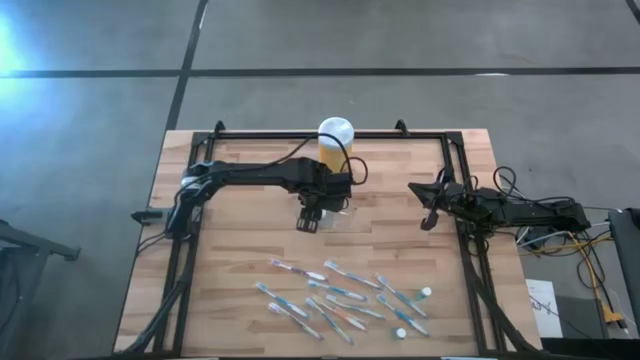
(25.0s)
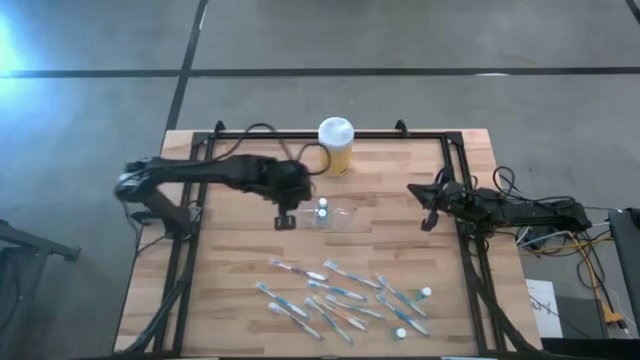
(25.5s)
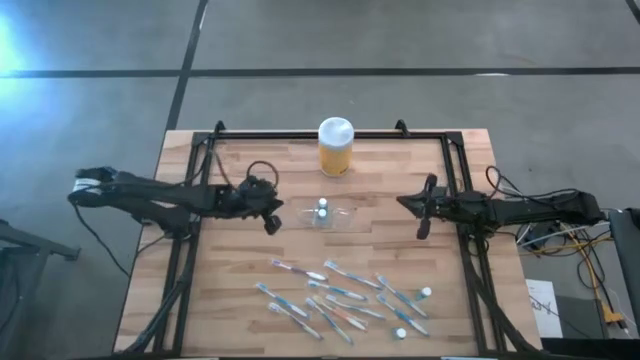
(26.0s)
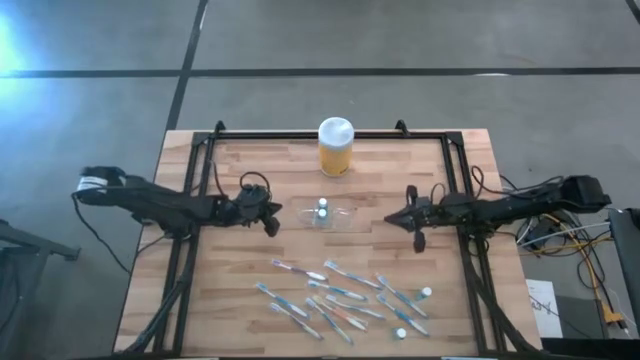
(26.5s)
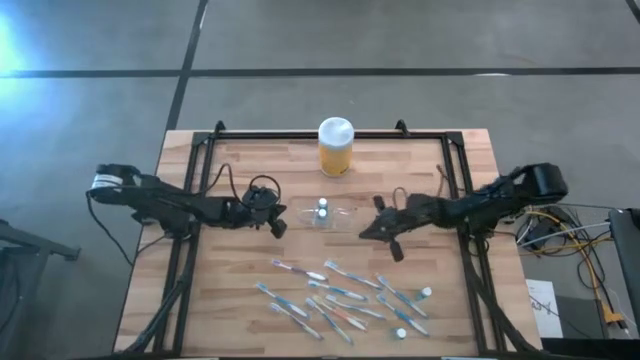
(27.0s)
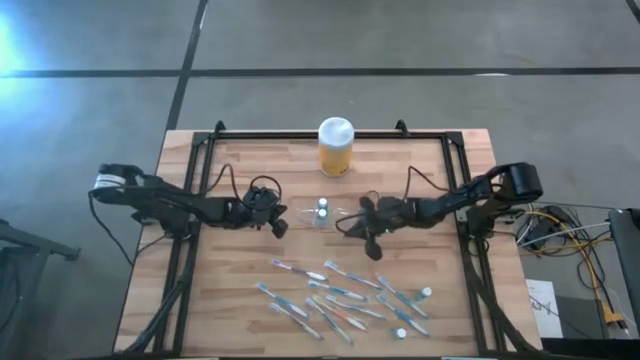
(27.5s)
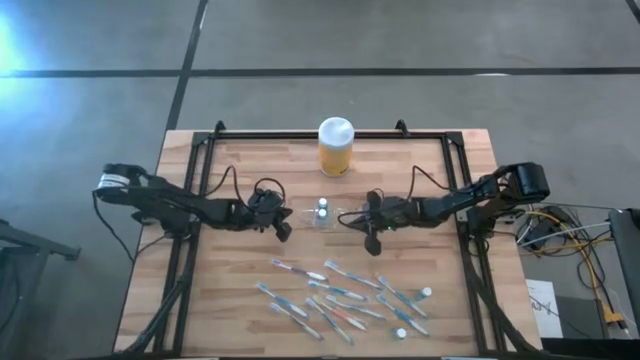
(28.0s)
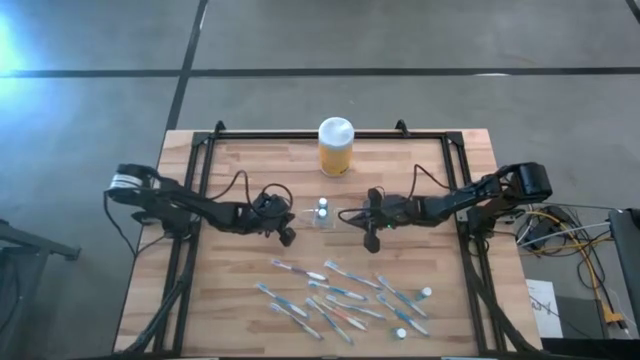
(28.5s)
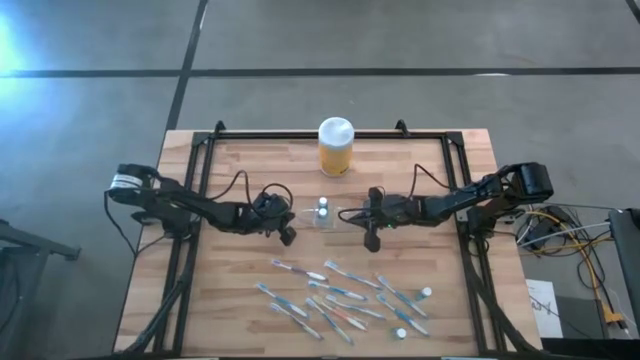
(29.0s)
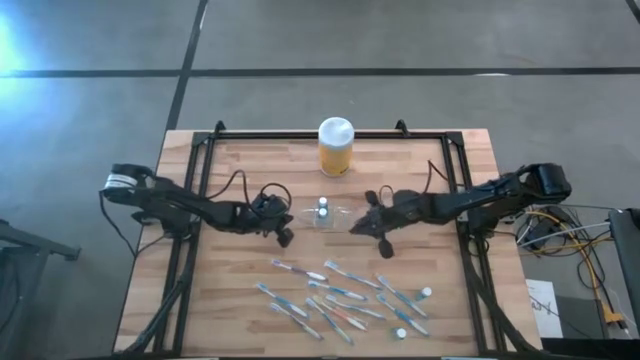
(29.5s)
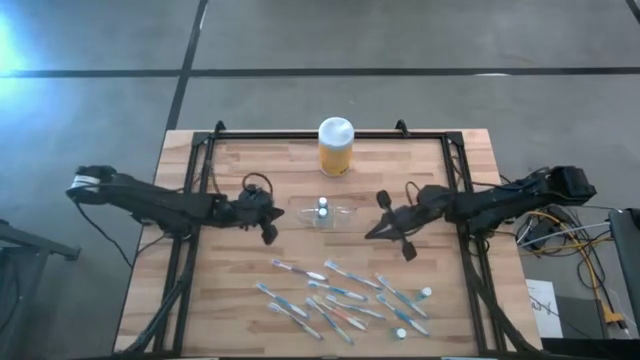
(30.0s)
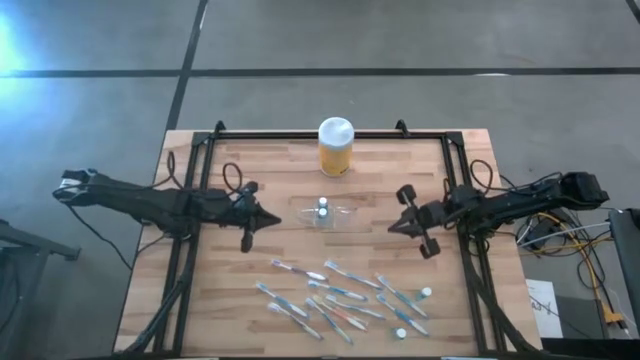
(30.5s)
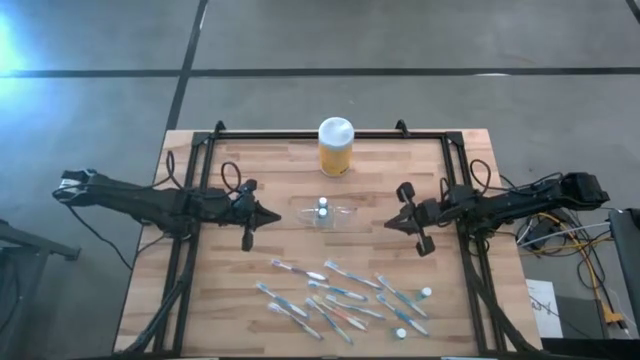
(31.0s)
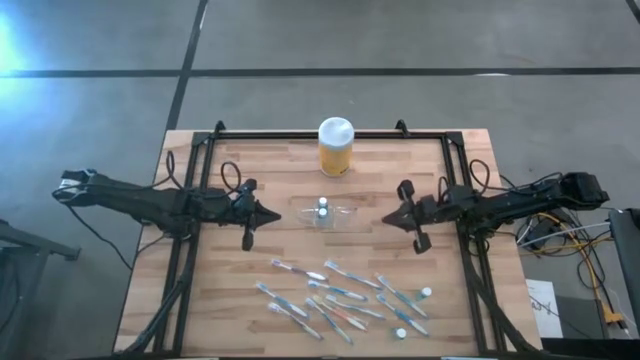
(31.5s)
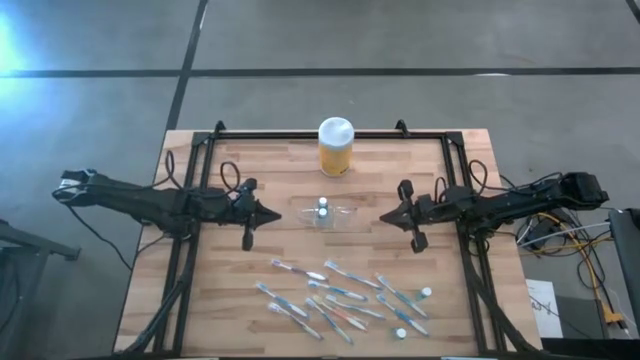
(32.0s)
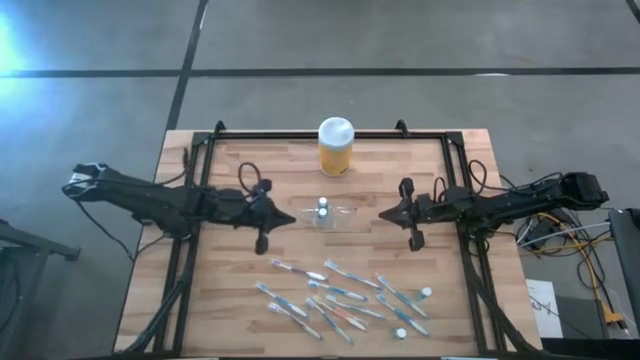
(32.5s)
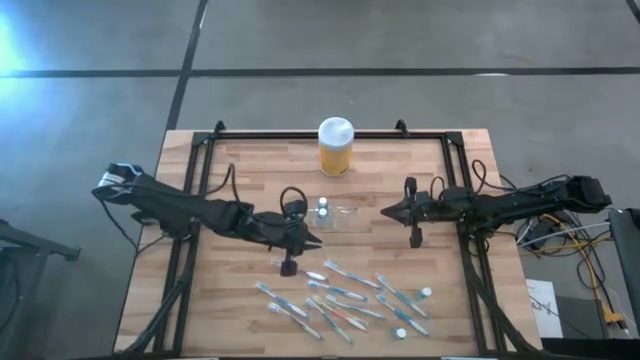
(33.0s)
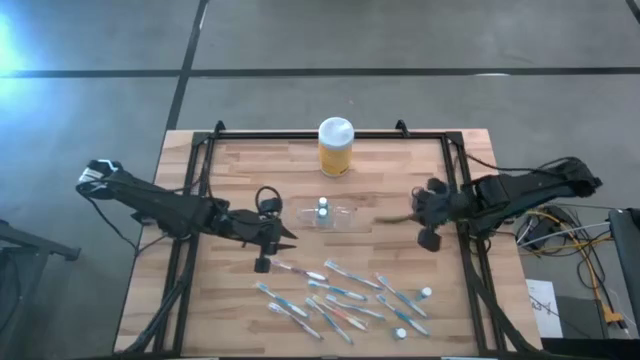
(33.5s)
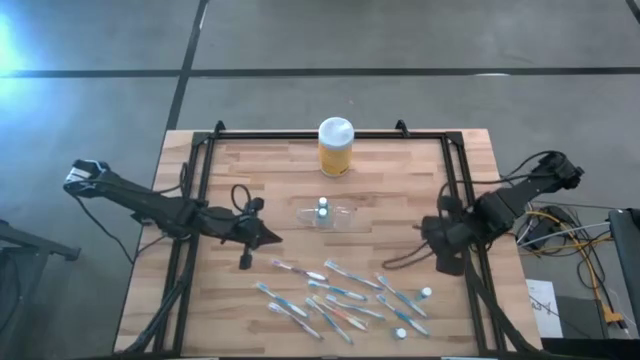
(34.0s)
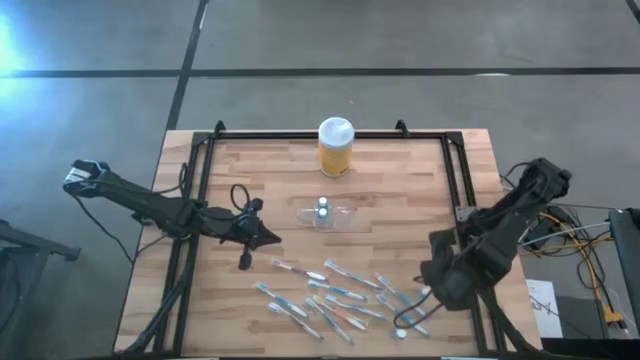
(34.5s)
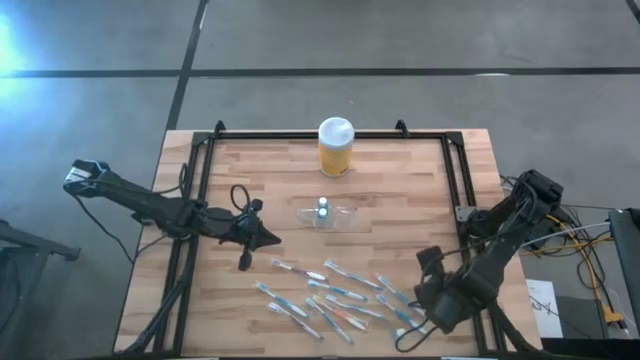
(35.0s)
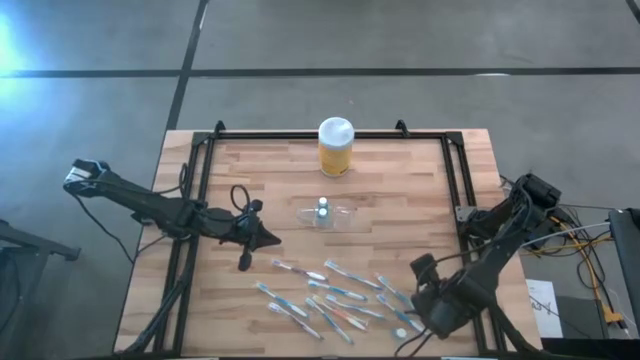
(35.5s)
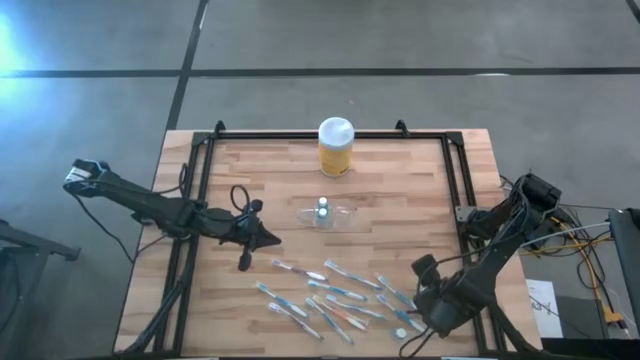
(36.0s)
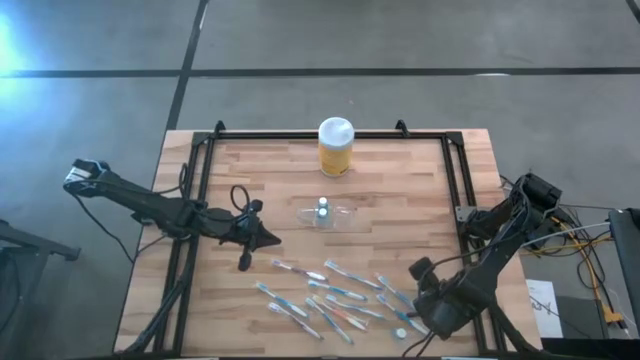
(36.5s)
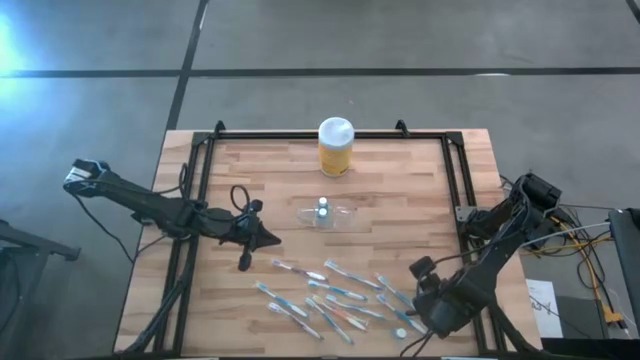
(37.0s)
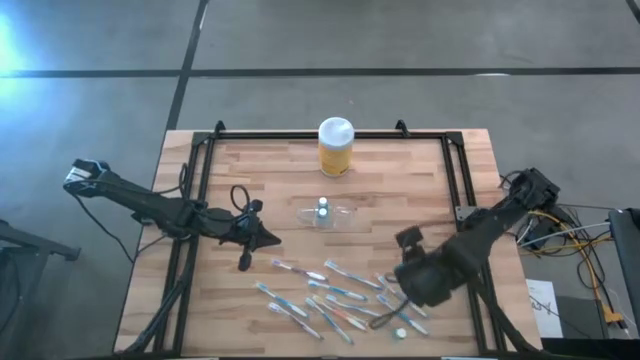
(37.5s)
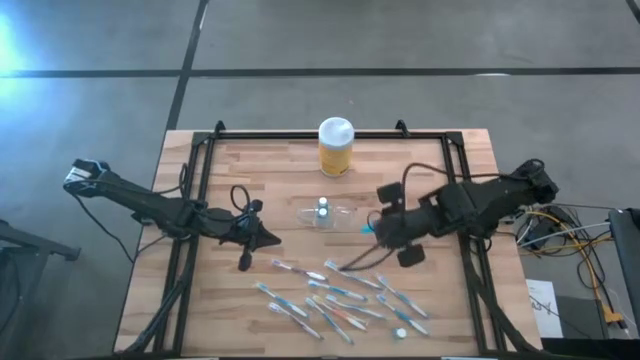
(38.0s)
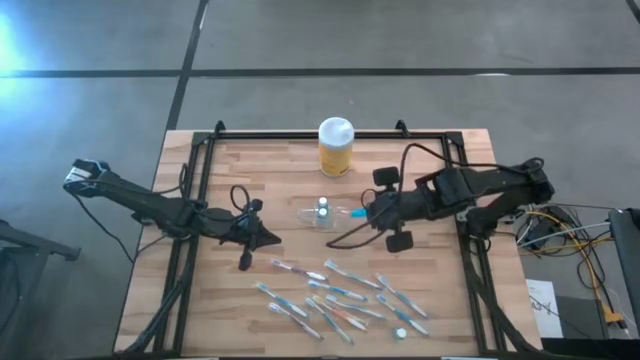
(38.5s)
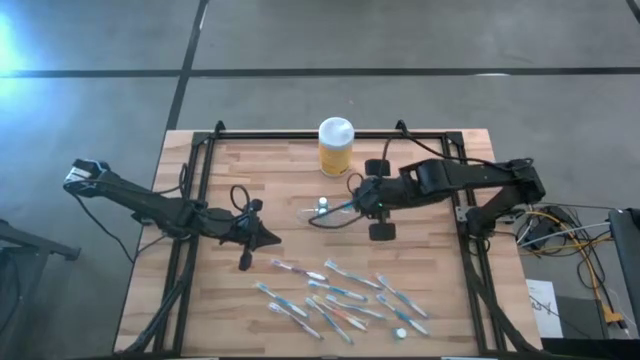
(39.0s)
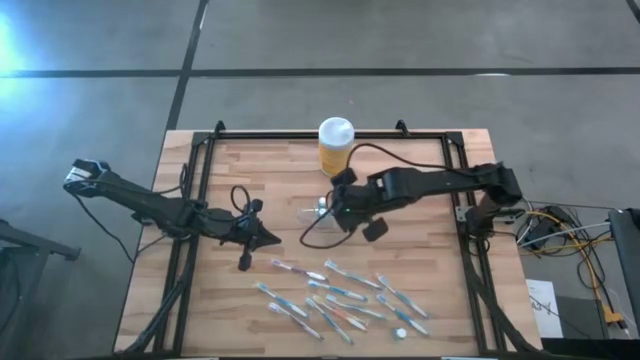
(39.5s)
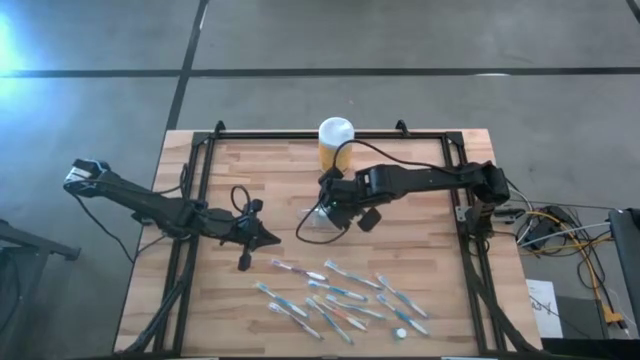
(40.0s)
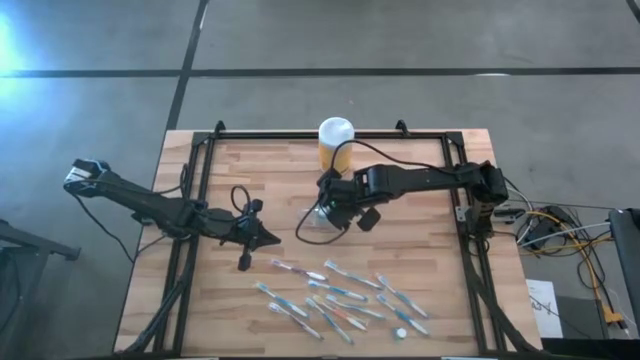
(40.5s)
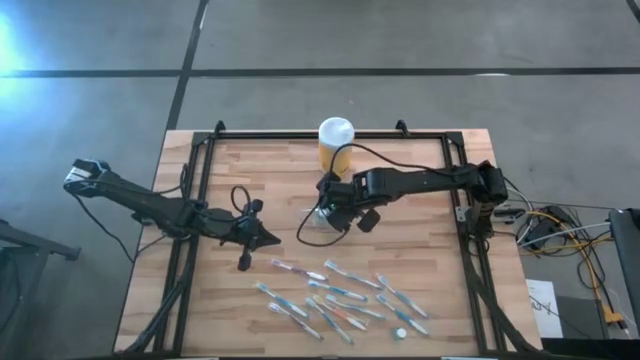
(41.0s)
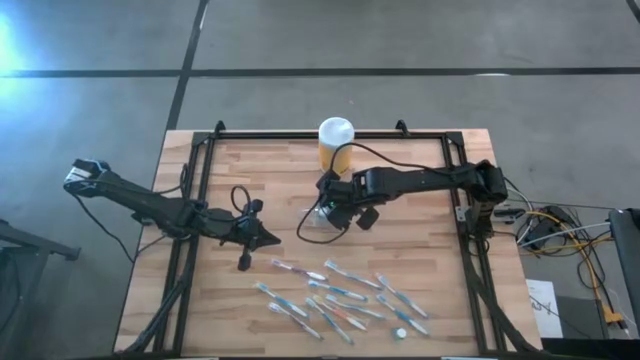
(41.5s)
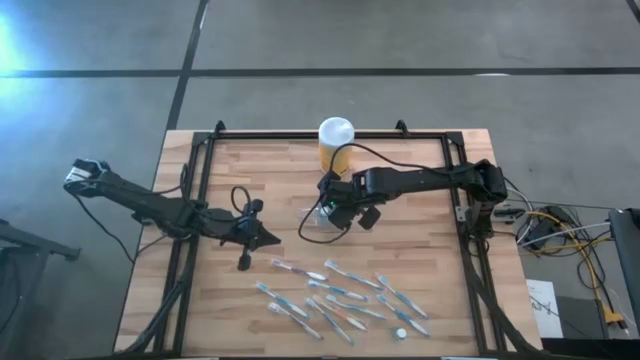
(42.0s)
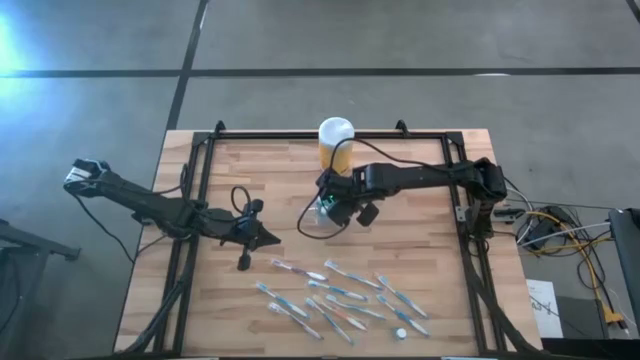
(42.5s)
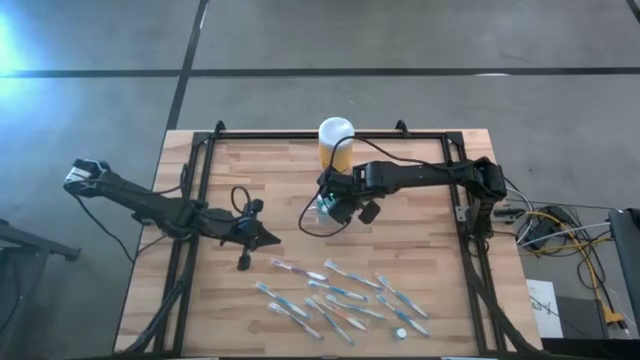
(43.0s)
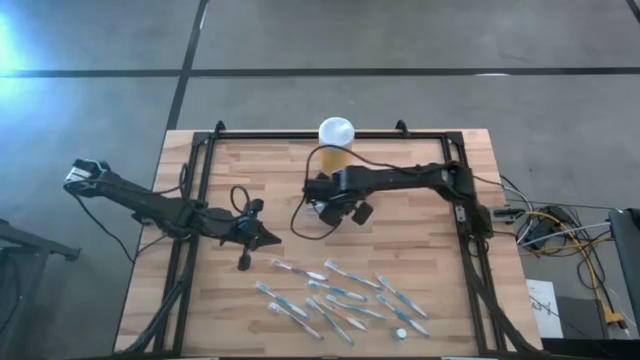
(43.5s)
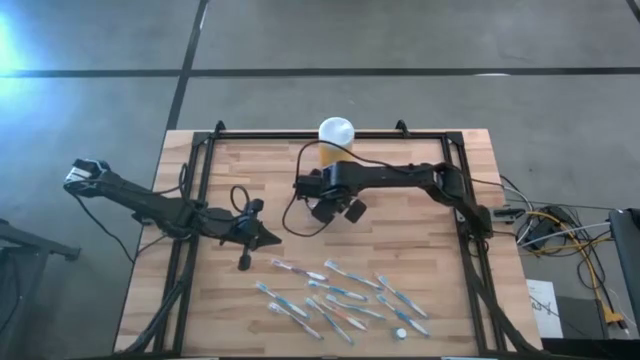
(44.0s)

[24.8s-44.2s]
Task: Pick & Place toothbrushing station
Put the mouthwash bottle into the transparent organizer
